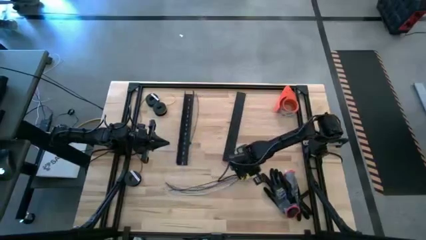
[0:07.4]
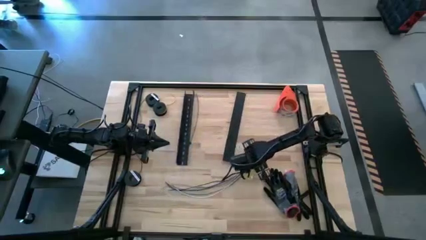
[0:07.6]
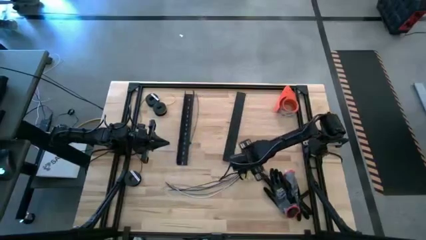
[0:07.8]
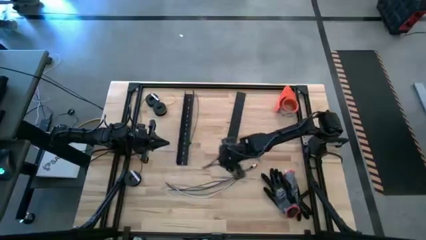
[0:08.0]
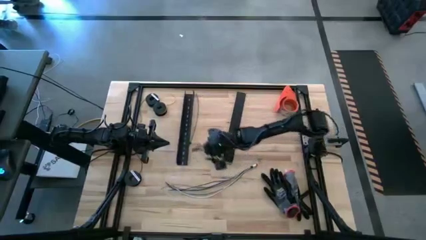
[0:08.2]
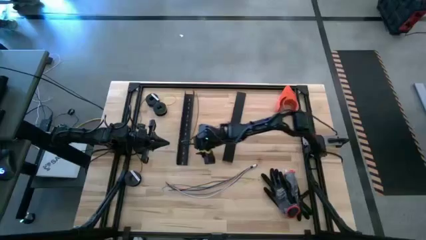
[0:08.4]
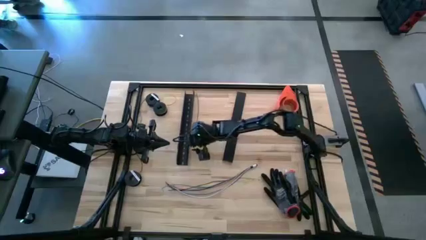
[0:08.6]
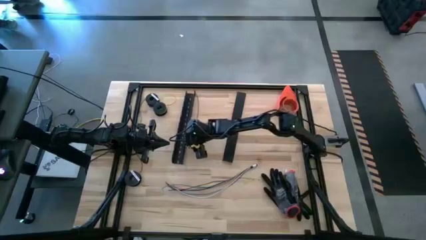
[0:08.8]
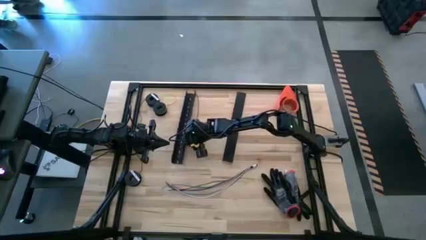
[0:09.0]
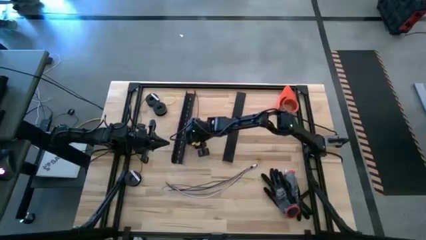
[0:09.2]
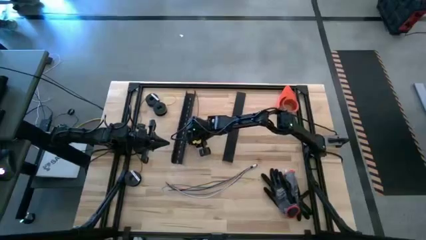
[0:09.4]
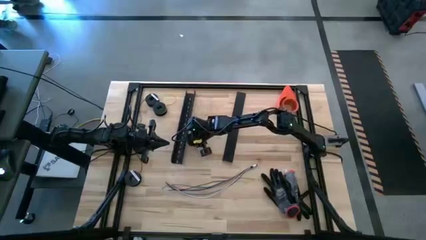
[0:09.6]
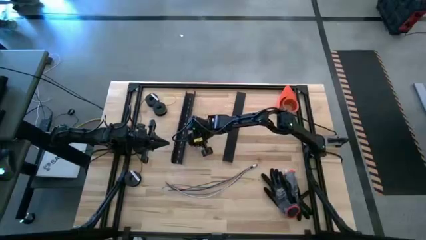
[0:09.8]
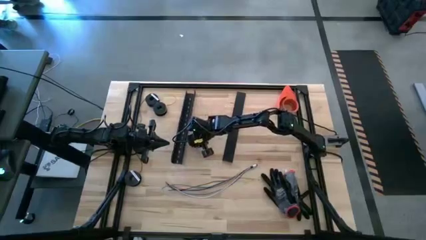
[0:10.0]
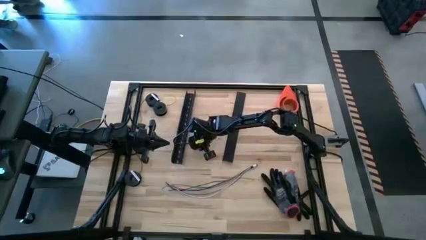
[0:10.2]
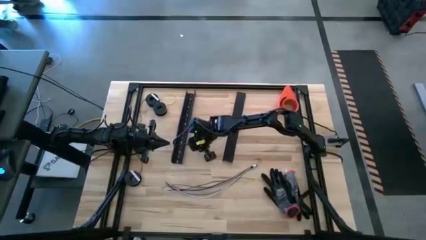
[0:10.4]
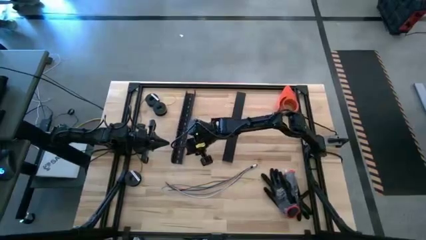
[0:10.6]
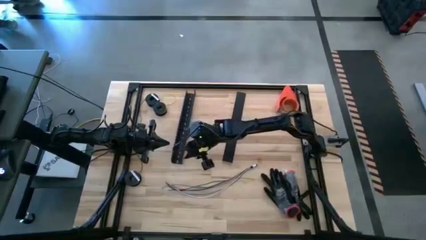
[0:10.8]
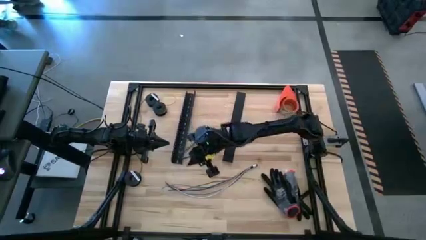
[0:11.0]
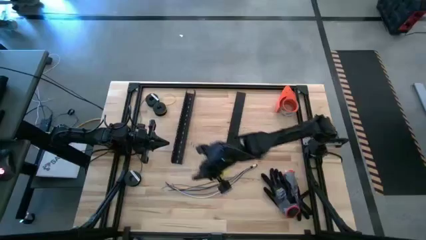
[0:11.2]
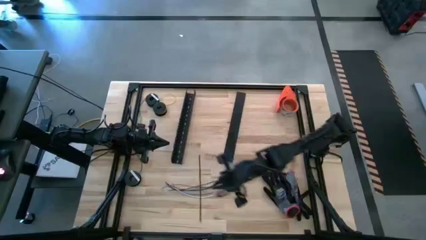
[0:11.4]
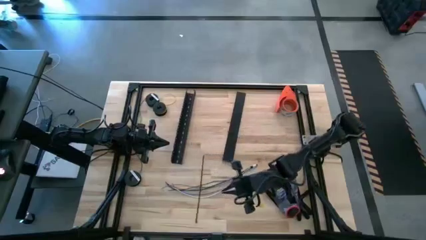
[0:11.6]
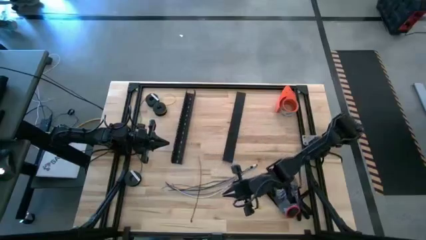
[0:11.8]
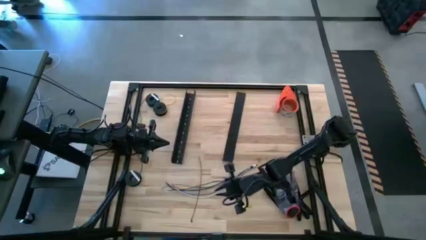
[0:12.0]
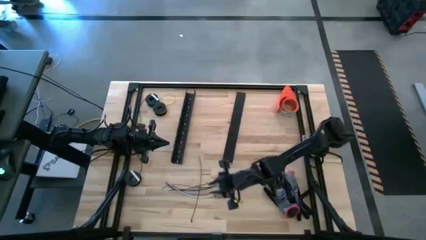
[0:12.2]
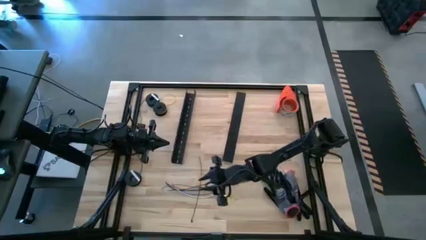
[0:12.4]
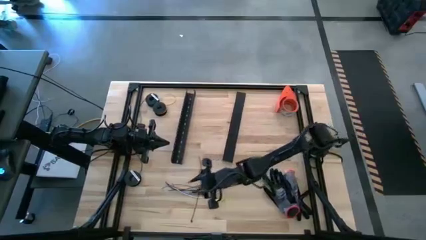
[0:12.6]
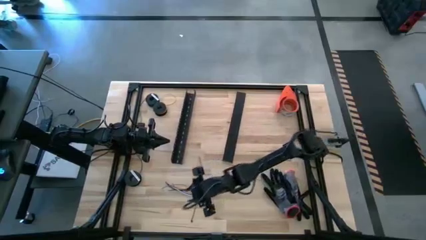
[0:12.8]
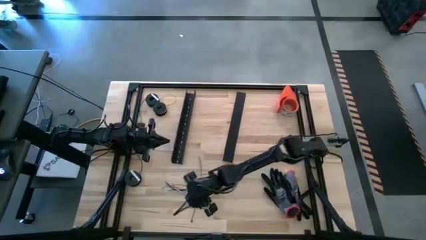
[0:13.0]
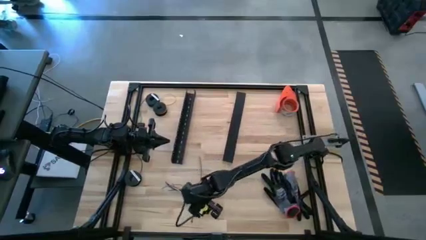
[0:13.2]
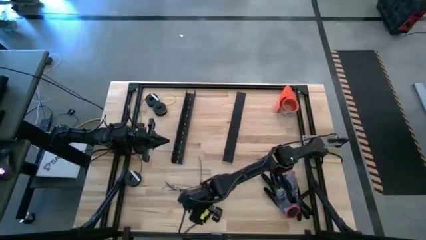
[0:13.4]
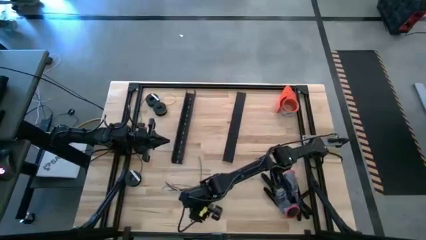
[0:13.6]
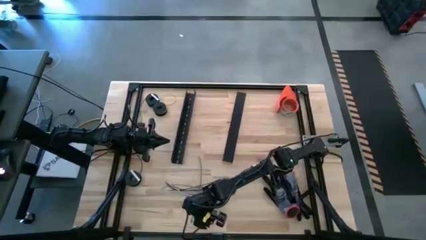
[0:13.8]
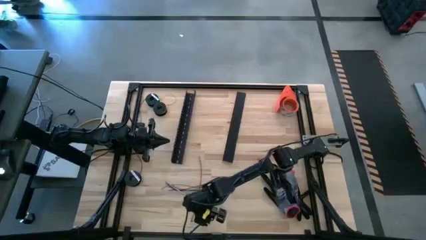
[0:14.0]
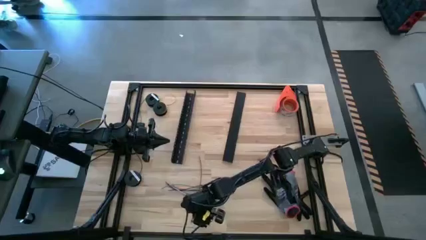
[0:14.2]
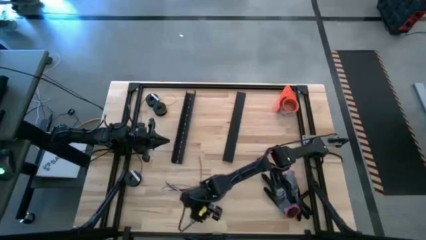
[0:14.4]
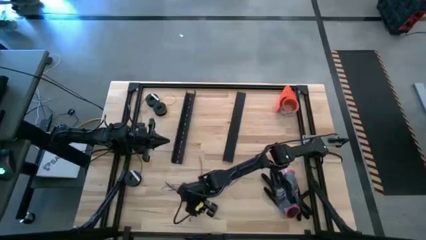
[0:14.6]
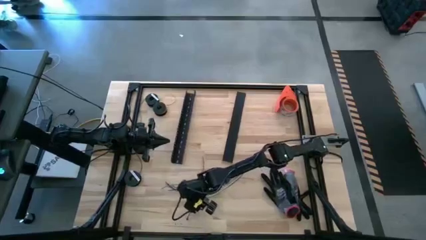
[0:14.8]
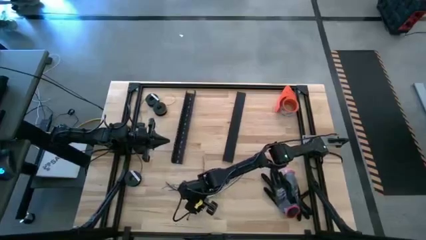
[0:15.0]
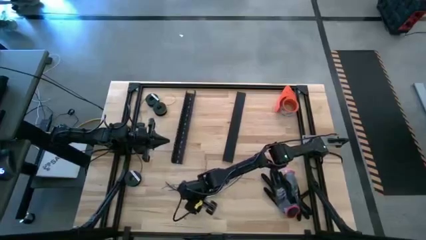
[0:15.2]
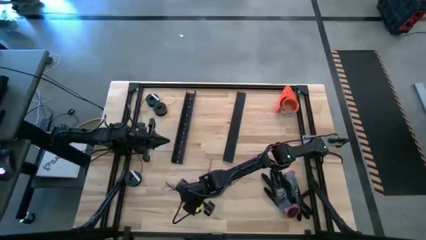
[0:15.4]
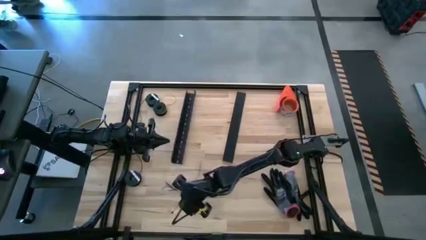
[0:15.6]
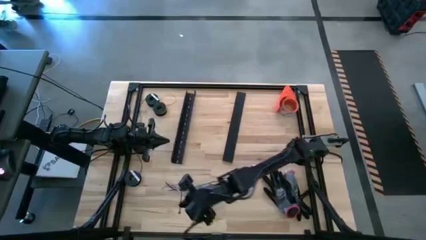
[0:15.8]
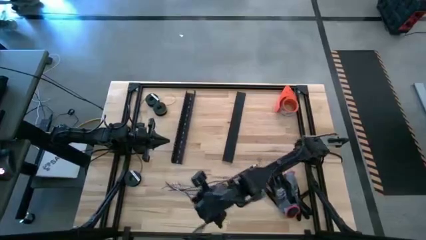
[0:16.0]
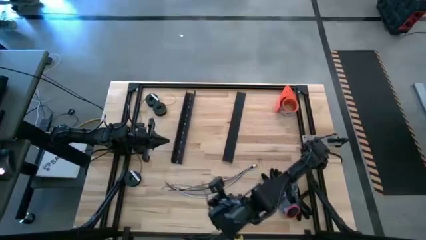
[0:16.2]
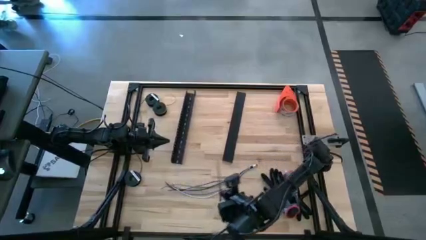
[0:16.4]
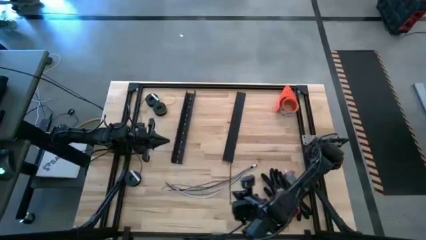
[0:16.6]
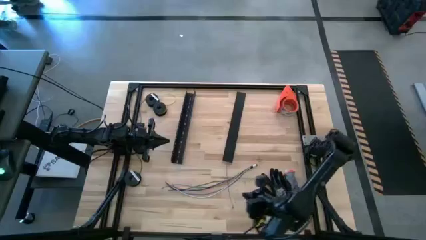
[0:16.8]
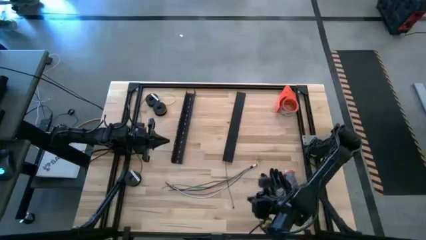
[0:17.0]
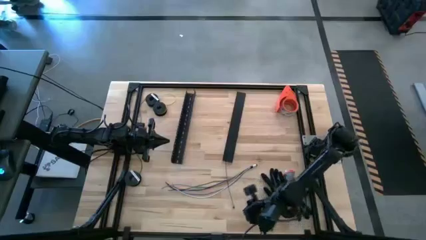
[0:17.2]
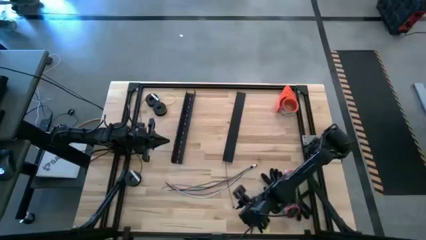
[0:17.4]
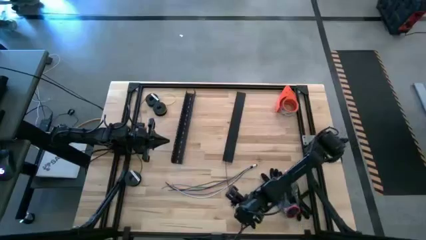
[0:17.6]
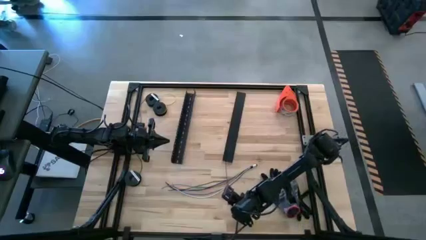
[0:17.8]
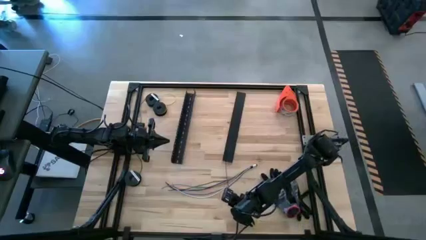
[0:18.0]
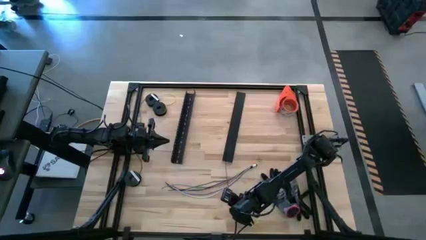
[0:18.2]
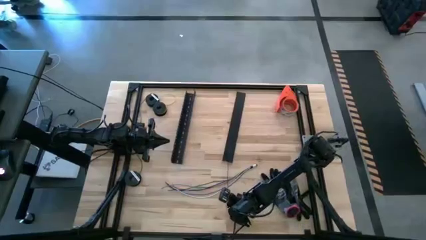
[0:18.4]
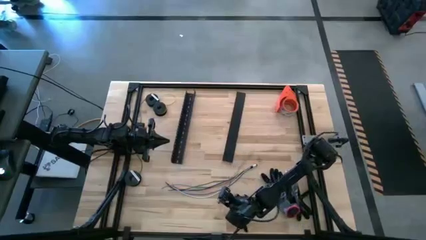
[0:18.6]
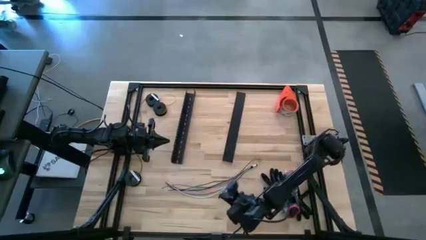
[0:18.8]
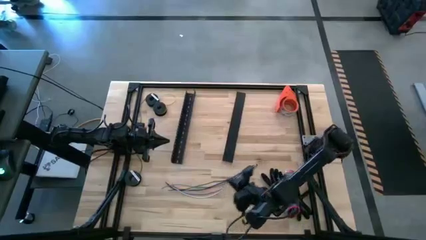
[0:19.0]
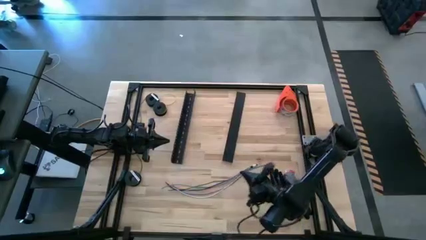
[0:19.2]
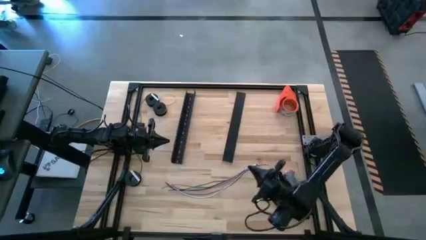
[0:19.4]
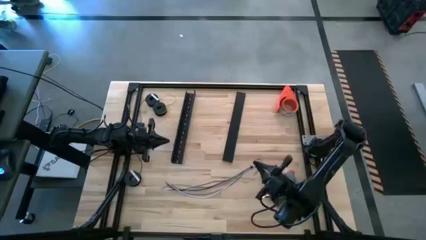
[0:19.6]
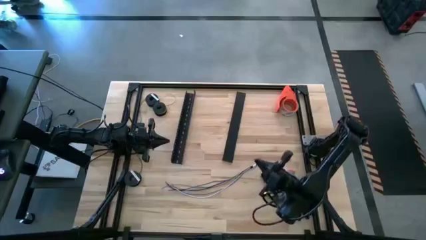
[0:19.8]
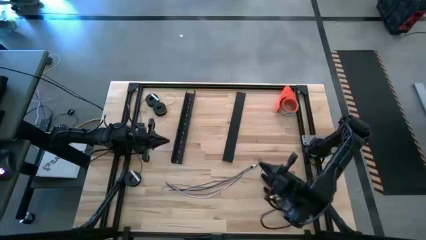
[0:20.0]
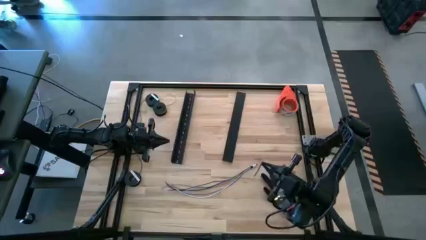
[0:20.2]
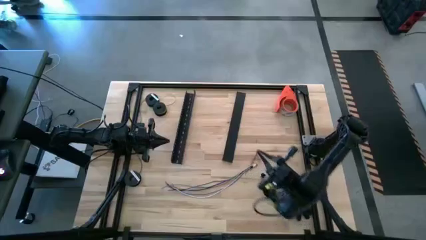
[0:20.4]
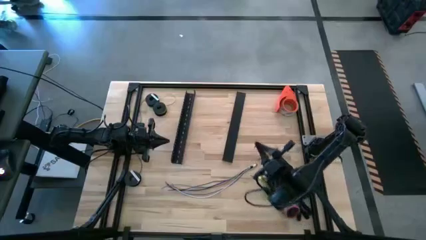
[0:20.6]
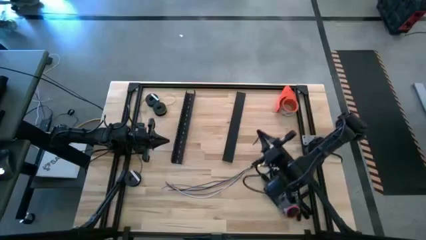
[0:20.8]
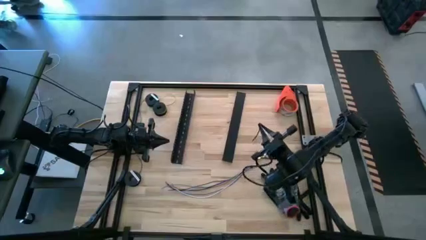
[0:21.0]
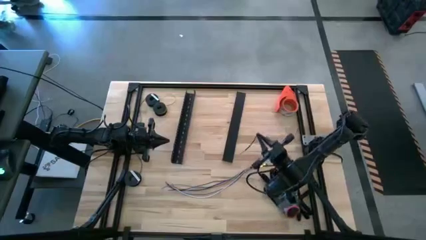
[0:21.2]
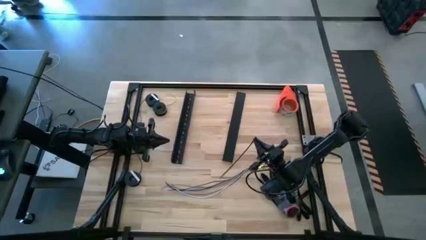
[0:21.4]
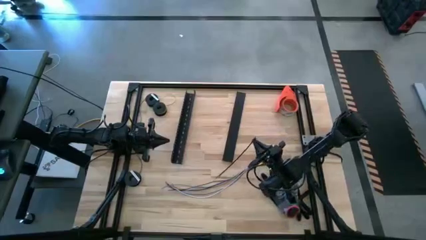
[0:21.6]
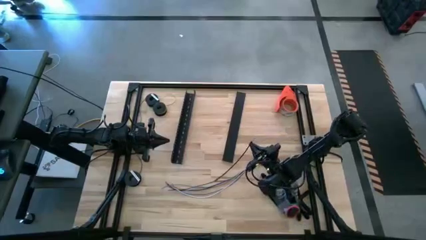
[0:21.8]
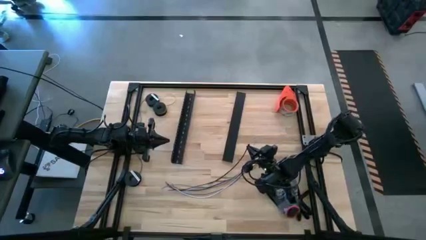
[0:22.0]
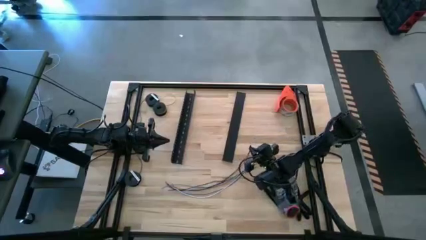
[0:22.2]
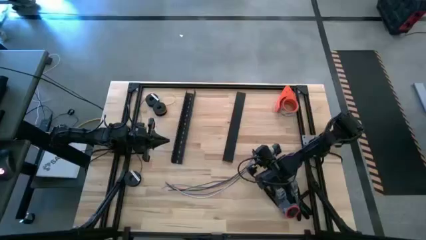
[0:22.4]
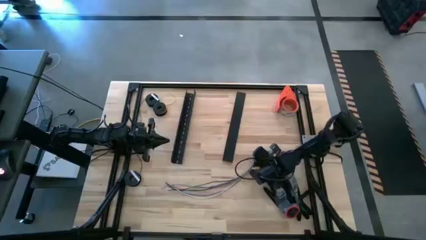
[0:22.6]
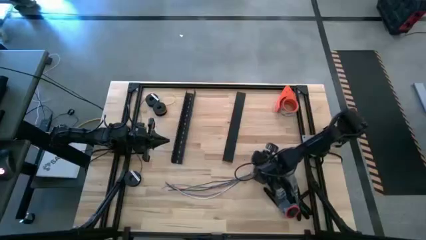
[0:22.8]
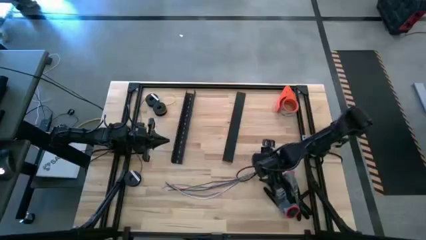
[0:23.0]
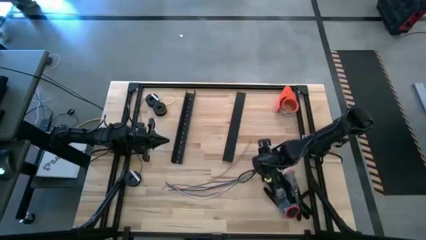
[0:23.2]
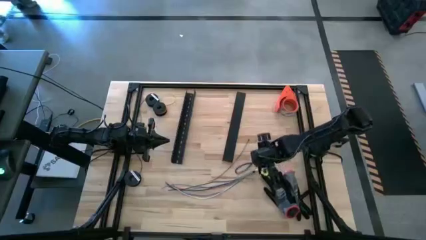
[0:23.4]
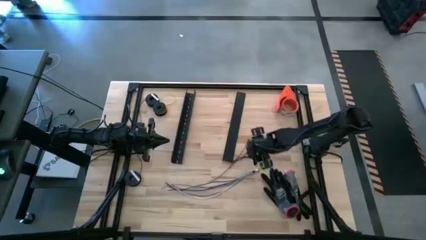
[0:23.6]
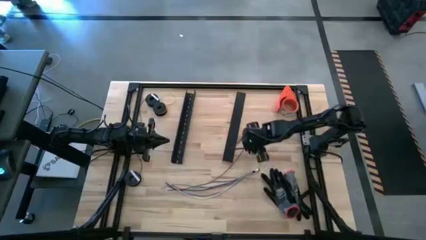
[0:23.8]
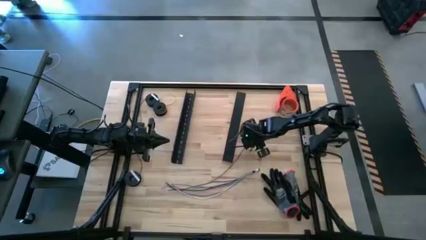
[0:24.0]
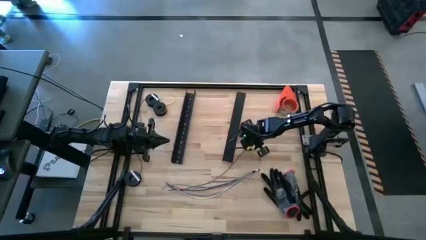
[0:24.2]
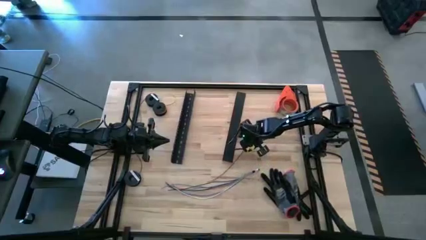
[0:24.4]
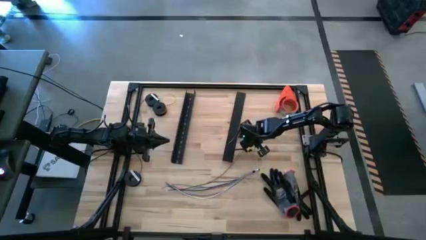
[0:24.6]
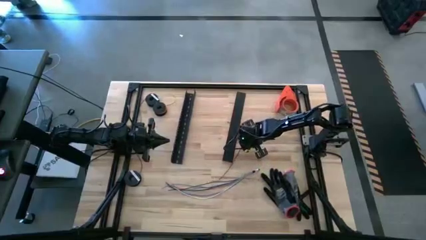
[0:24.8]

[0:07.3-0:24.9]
Task: Ziptie cables
Wrap the cable wires using zip tie
